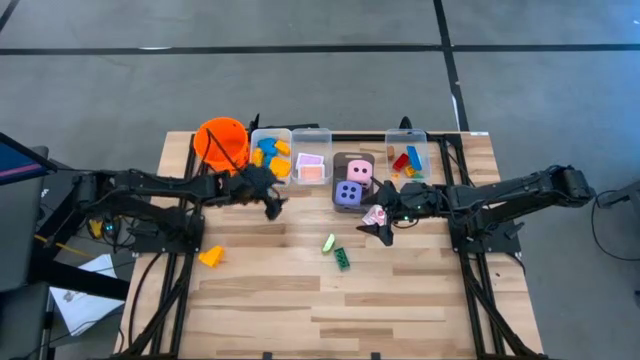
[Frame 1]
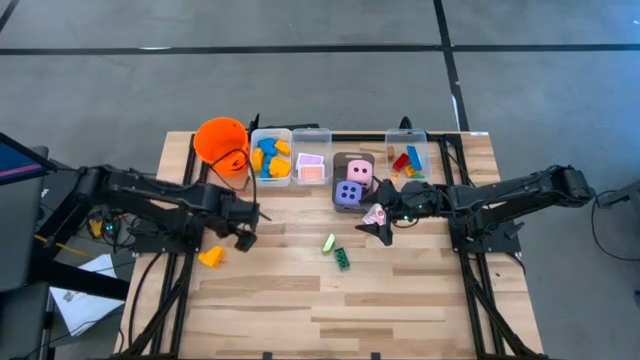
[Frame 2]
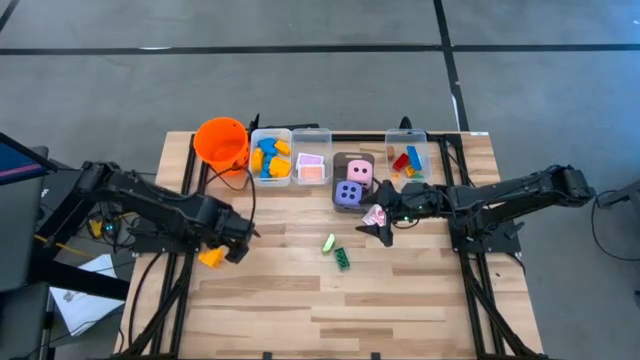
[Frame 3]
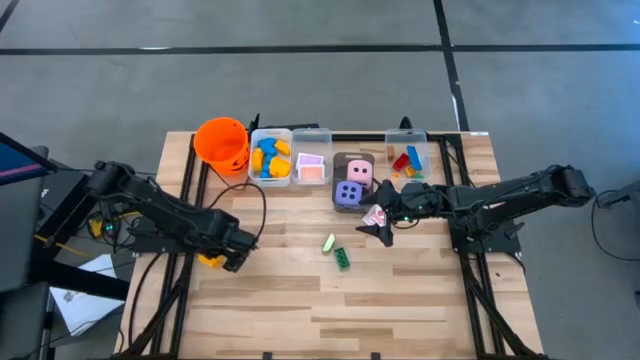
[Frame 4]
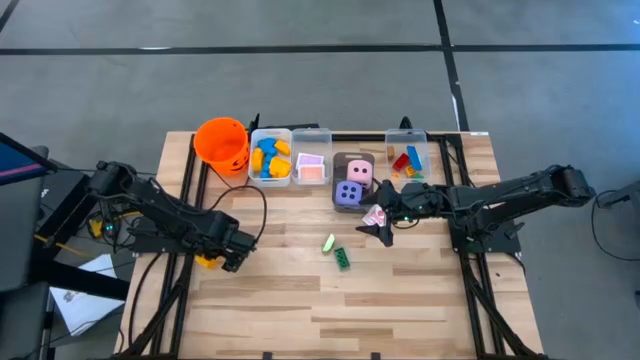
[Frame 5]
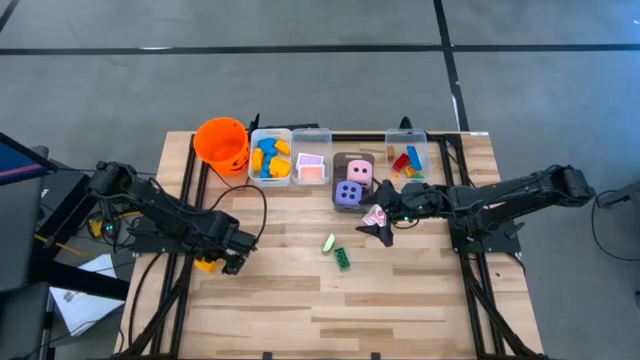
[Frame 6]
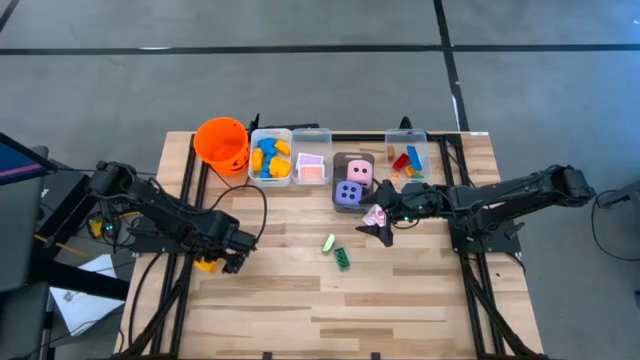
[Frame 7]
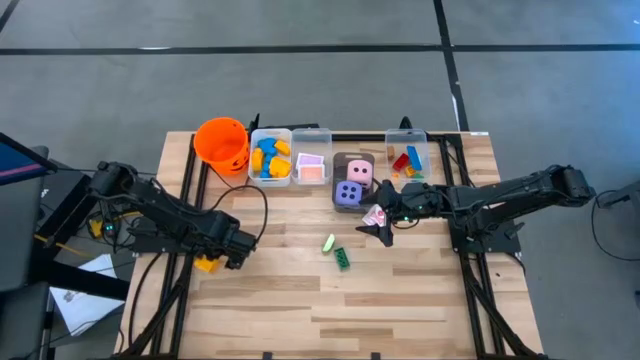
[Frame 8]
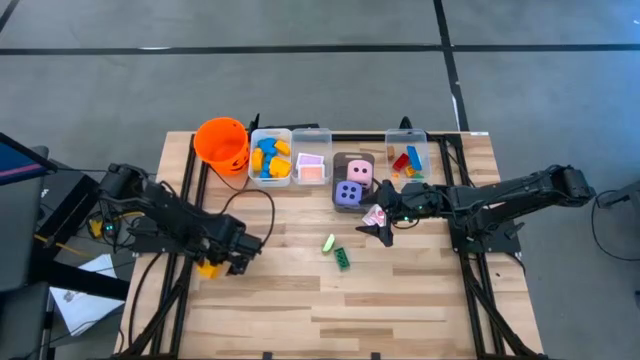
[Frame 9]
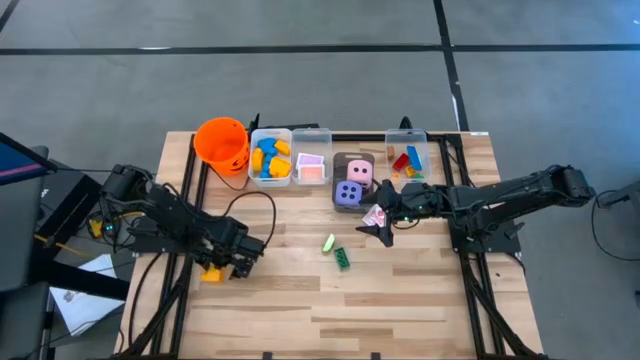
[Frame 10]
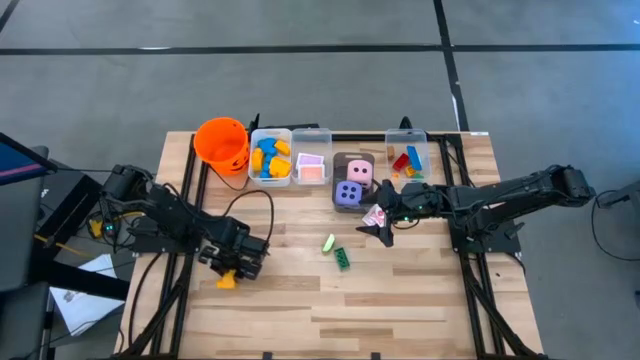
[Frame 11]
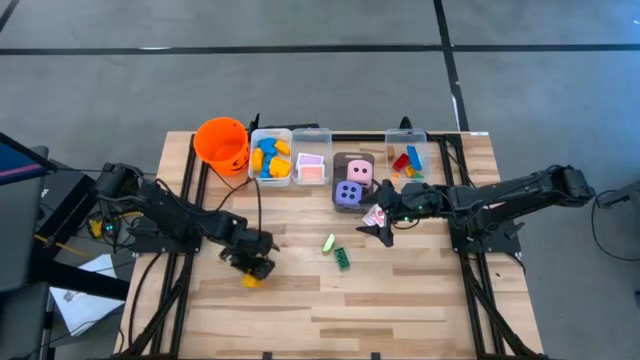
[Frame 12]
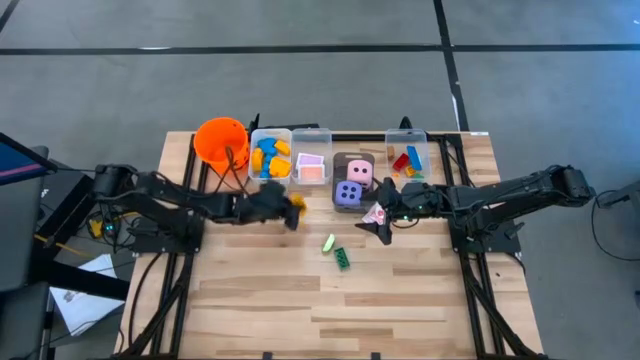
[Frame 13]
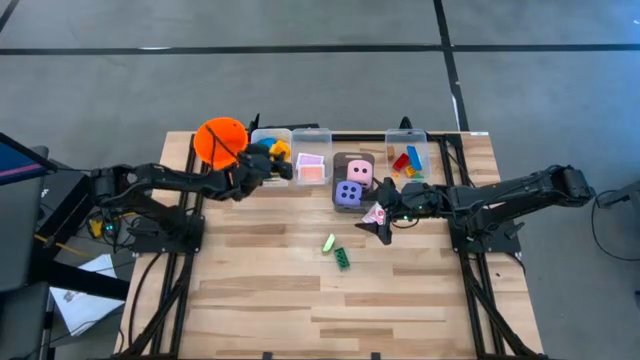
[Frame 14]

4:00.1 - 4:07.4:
Task: Pick & Place Toys
Put the big yellow game piece into the white bin

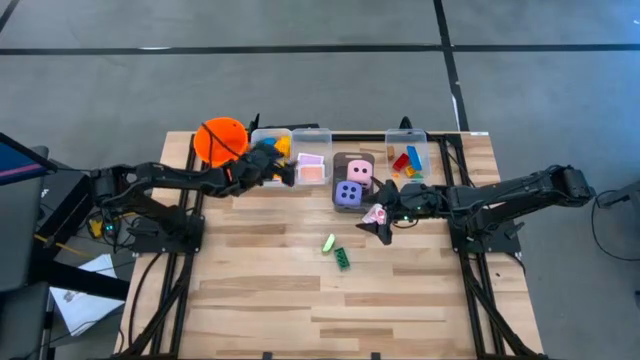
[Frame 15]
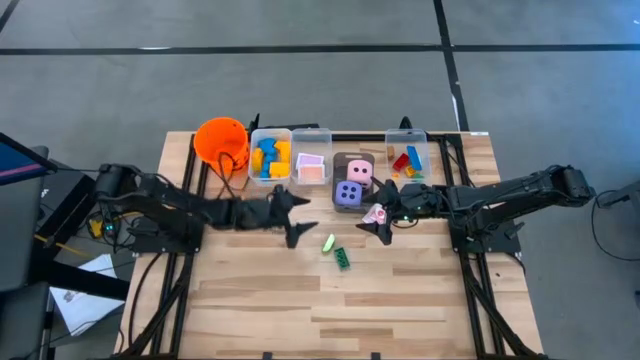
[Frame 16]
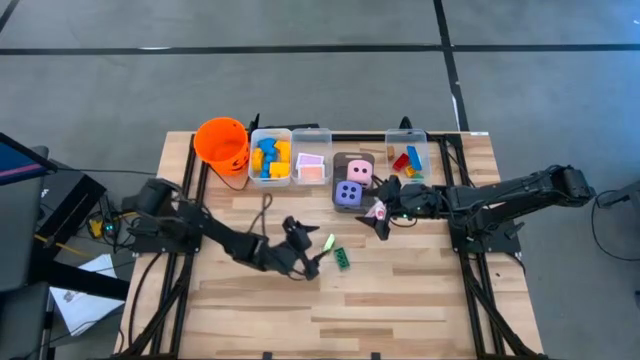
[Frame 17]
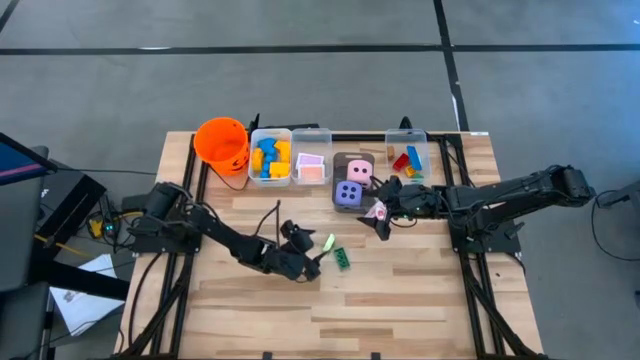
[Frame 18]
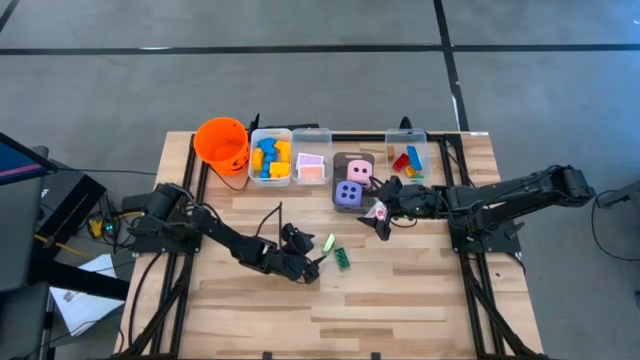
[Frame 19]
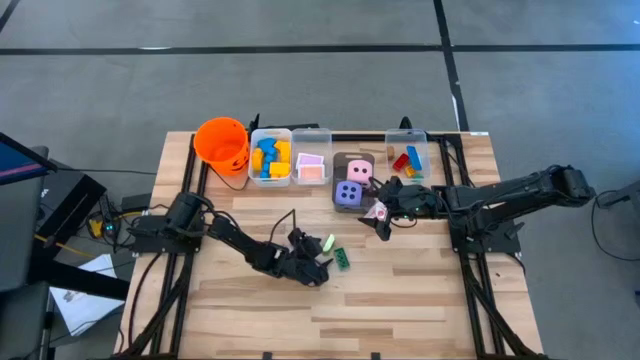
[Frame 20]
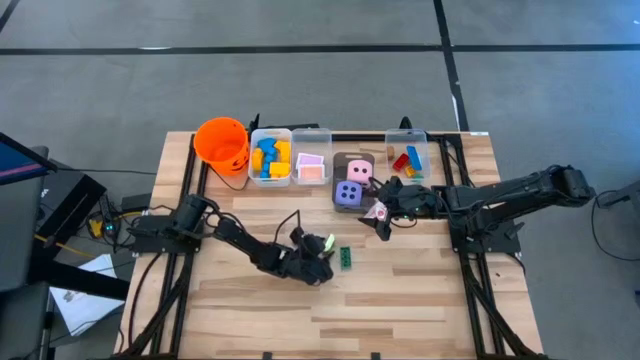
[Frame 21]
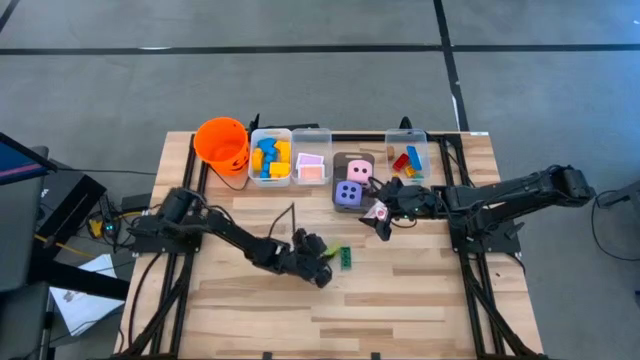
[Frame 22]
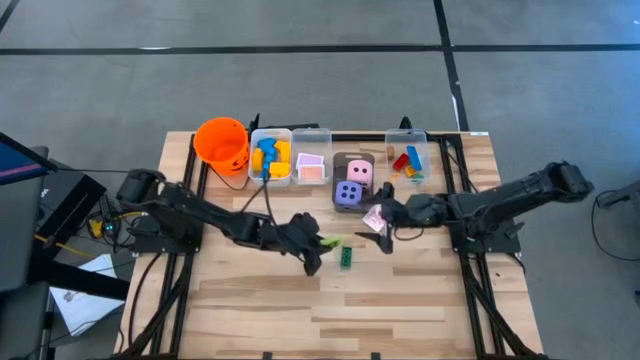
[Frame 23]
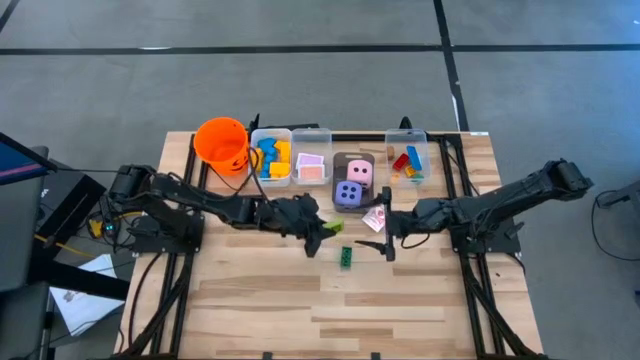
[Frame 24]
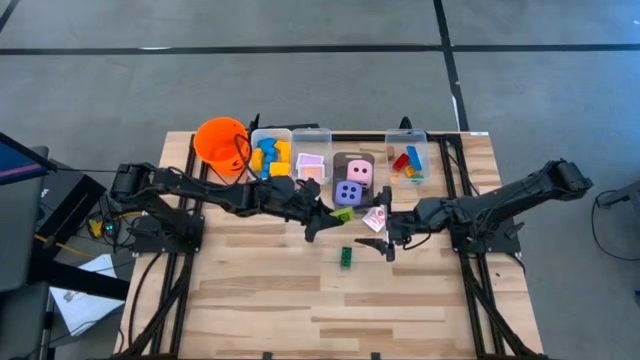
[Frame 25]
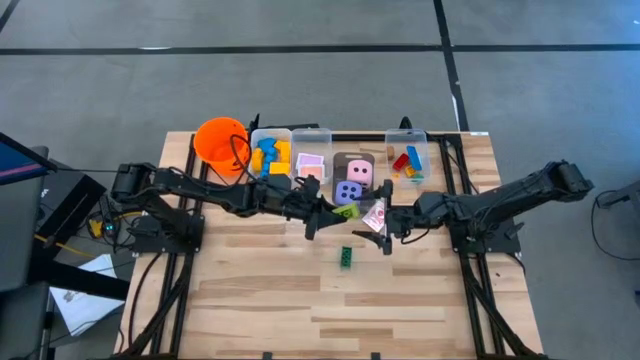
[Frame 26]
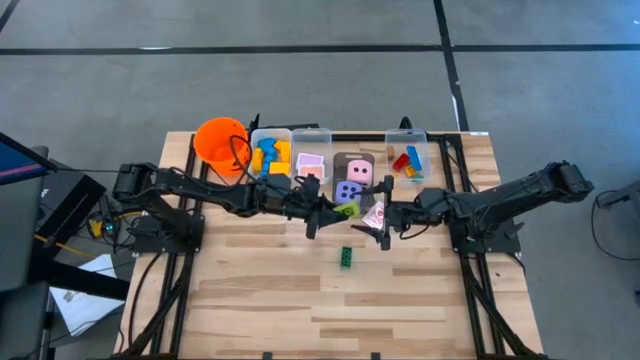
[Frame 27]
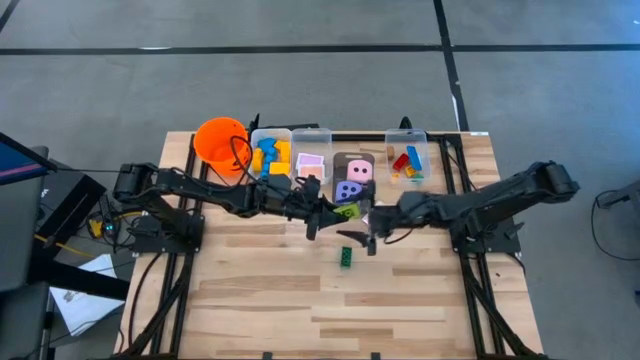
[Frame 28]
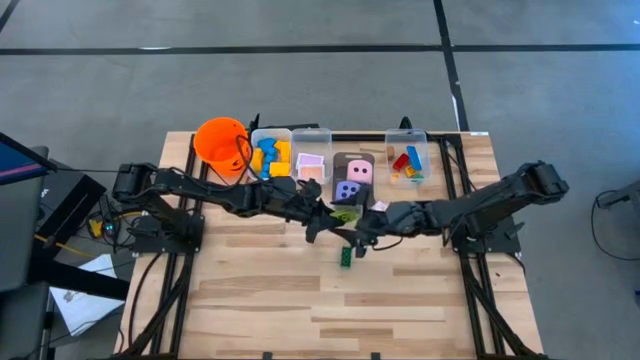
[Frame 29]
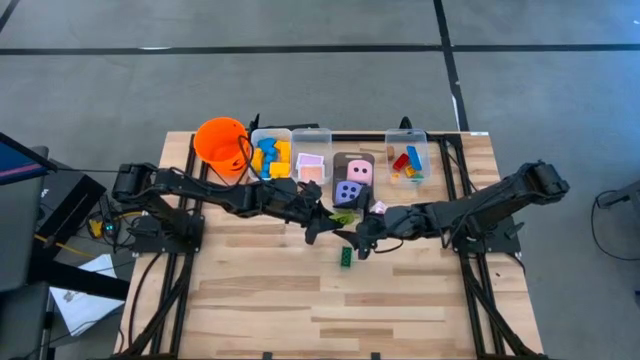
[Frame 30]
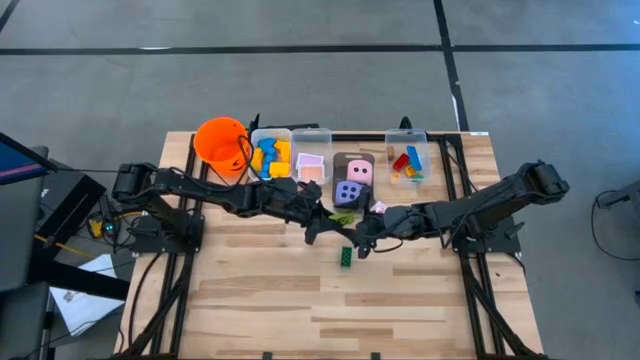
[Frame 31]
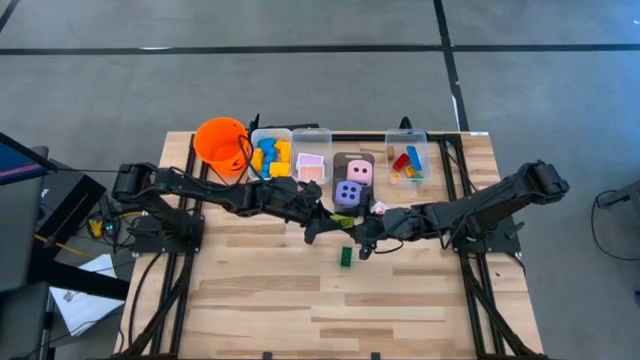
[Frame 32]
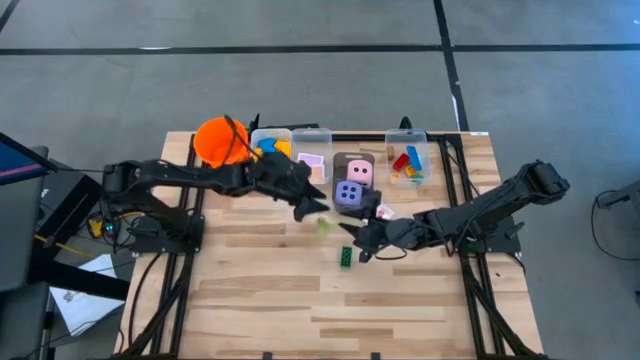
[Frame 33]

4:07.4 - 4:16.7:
Put the light green game piece into the right transparent bin

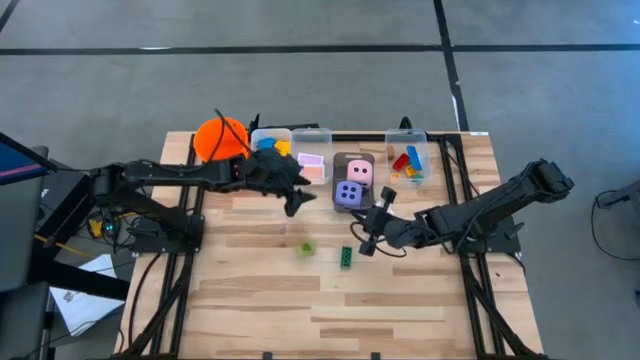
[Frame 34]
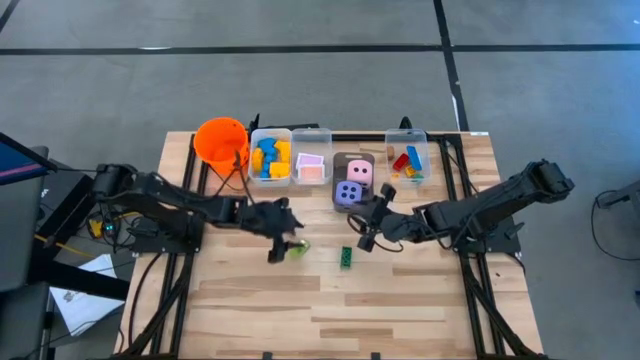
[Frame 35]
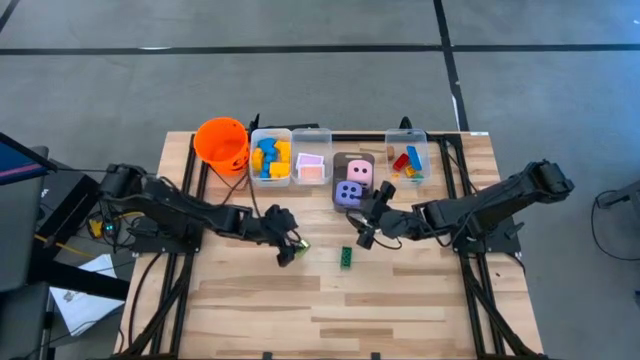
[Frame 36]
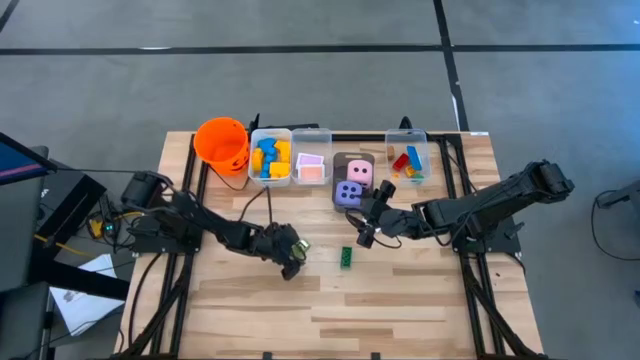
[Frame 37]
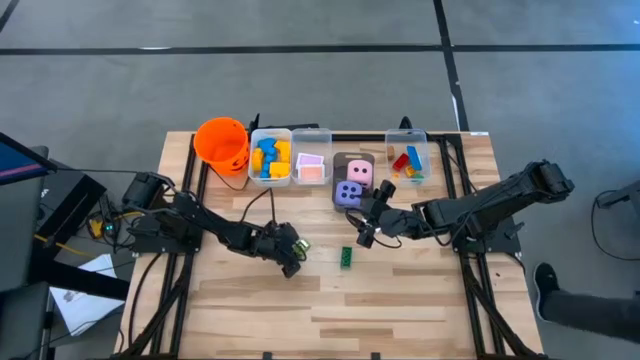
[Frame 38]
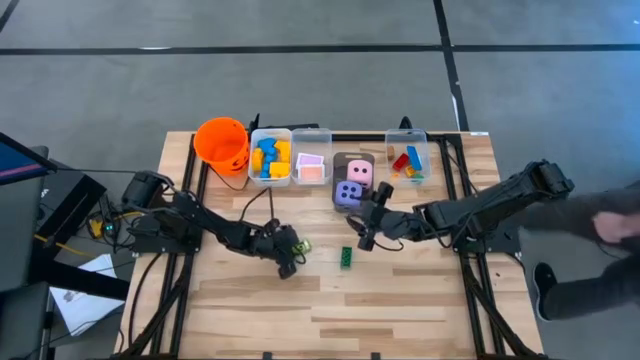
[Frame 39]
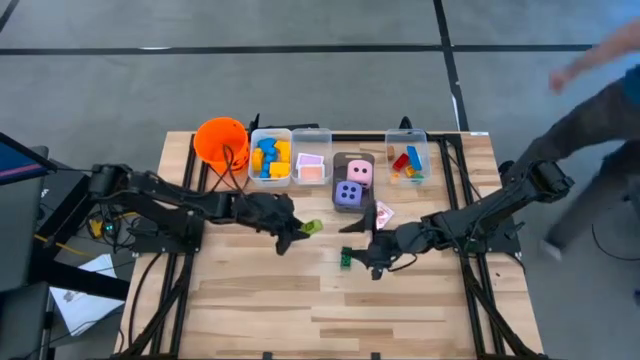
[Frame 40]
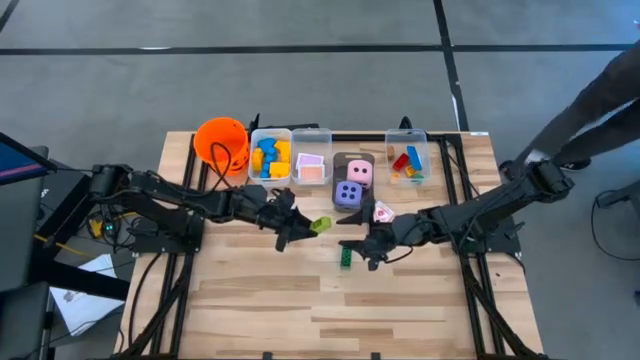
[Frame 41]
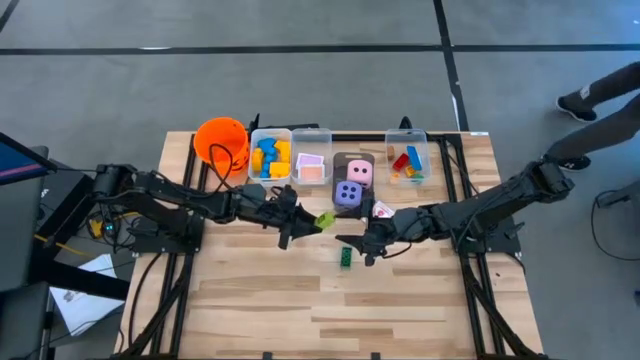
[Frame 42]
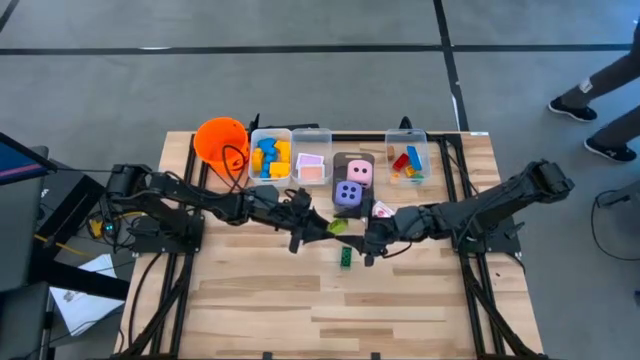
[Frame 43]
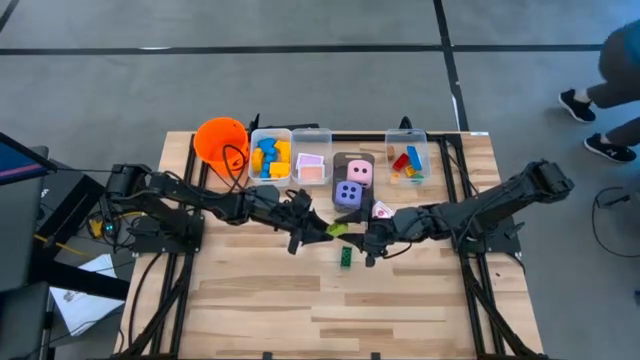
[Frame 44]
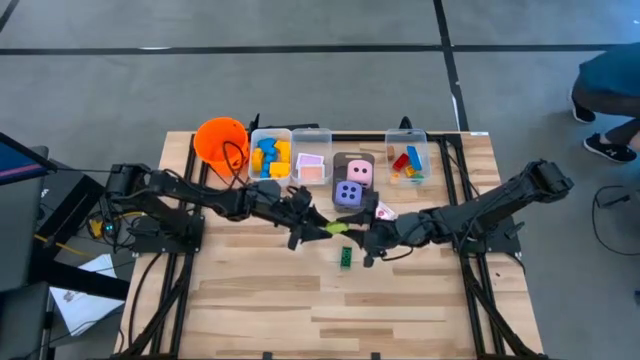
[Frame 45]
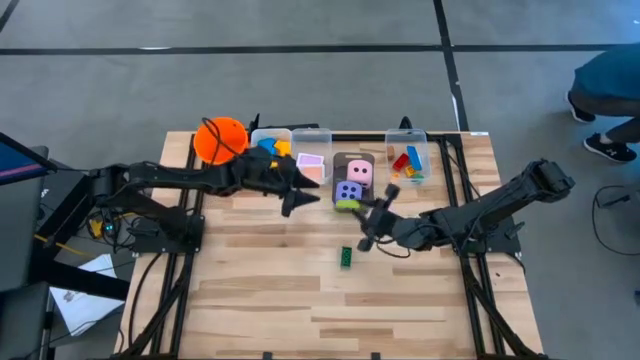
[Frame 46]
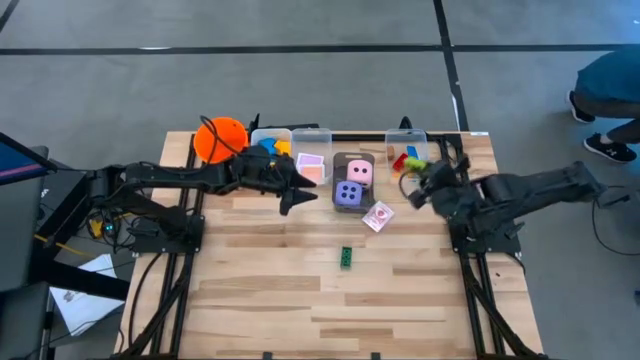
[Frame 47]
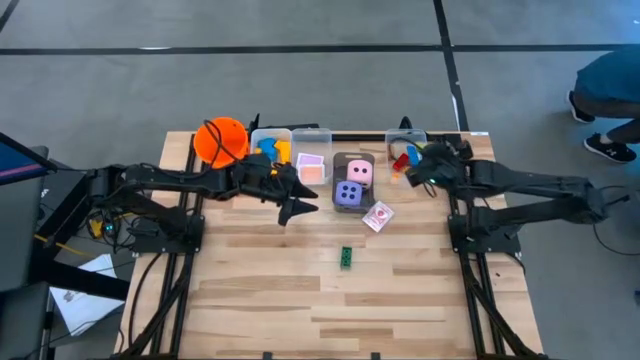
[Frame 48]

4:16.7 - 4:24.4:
Put the light green game piece into the right transparent bin
